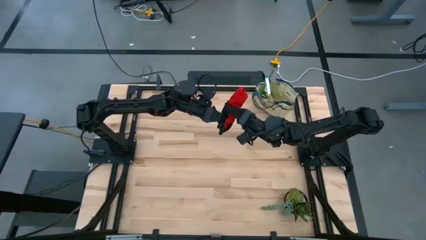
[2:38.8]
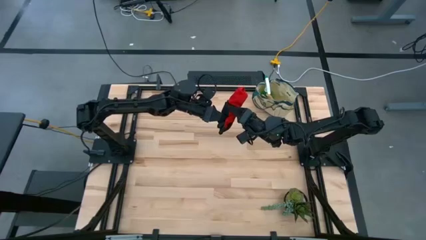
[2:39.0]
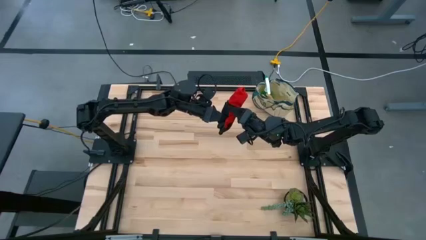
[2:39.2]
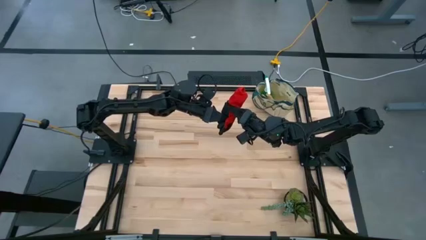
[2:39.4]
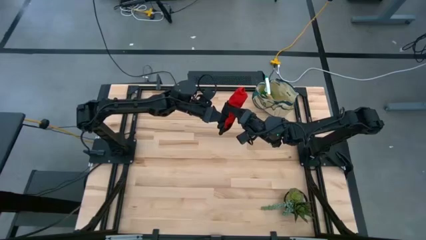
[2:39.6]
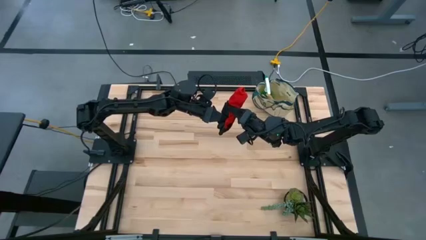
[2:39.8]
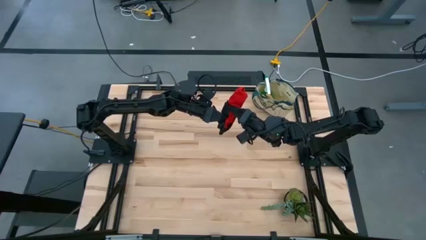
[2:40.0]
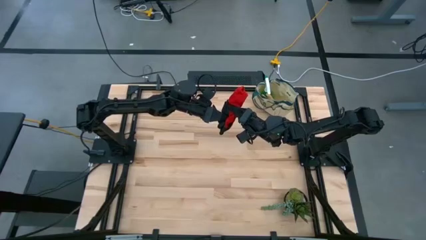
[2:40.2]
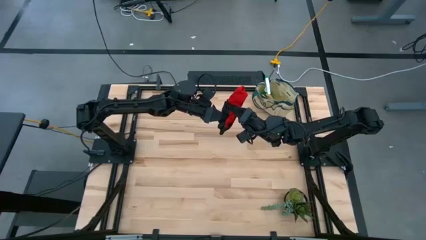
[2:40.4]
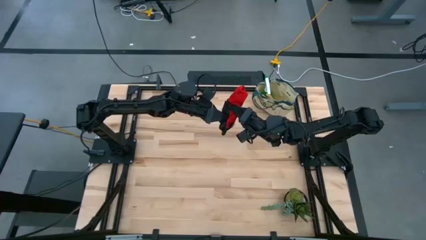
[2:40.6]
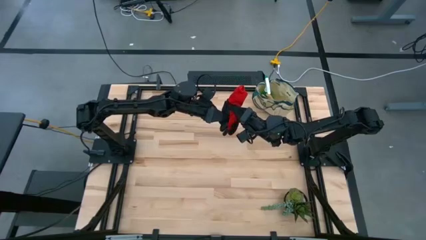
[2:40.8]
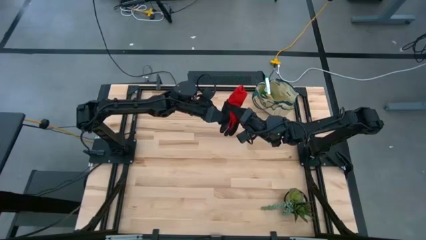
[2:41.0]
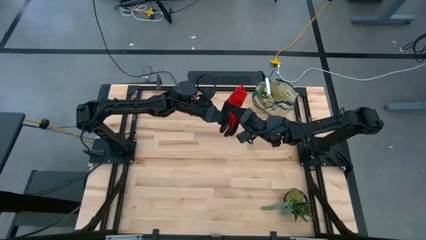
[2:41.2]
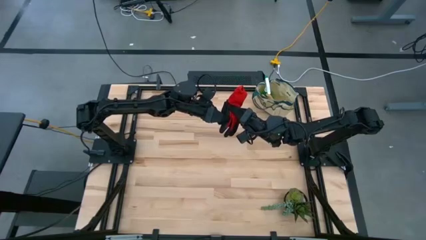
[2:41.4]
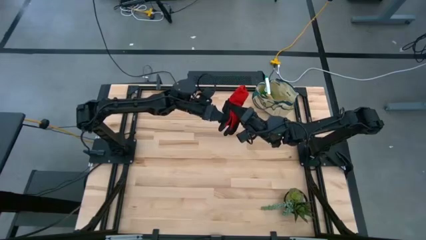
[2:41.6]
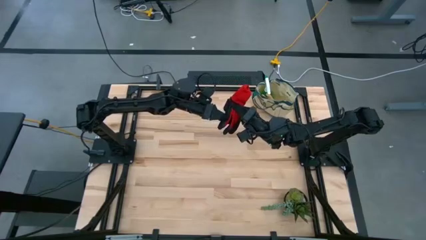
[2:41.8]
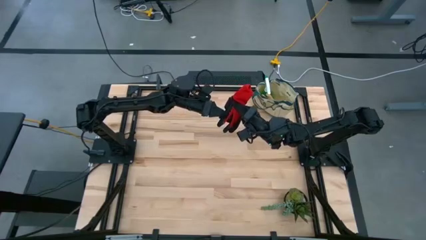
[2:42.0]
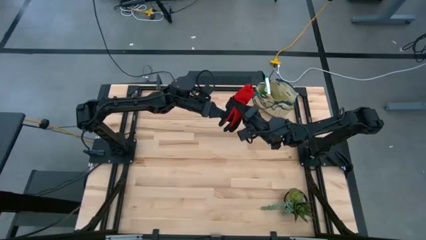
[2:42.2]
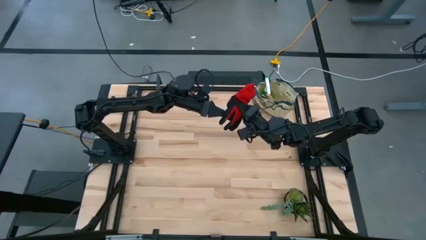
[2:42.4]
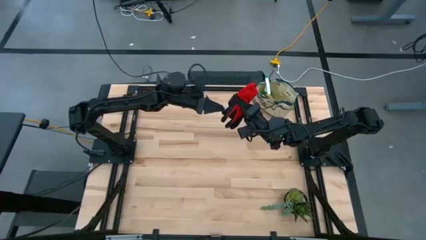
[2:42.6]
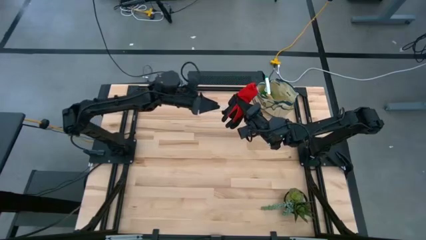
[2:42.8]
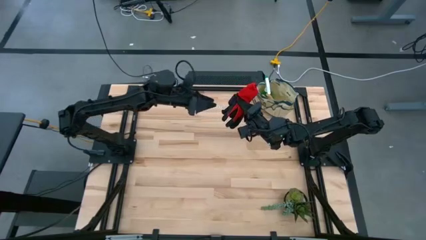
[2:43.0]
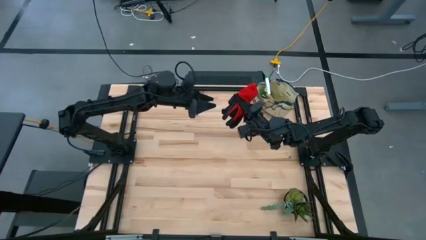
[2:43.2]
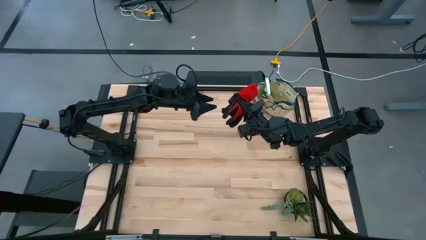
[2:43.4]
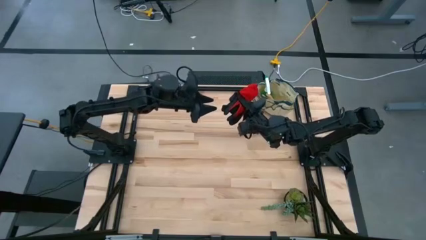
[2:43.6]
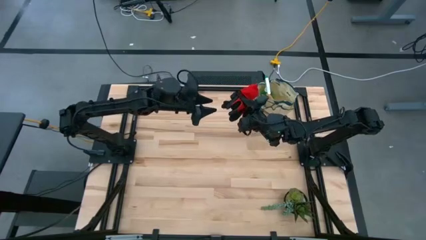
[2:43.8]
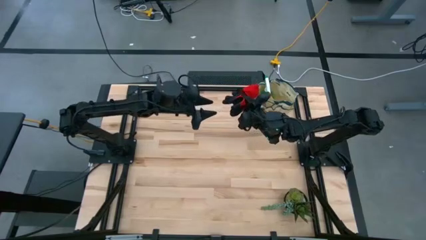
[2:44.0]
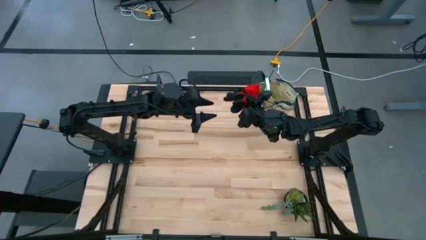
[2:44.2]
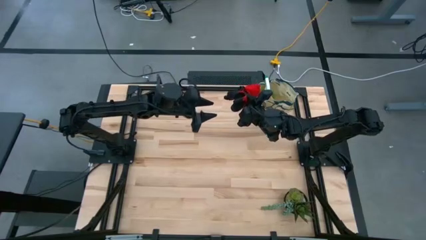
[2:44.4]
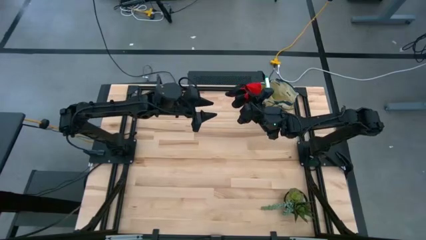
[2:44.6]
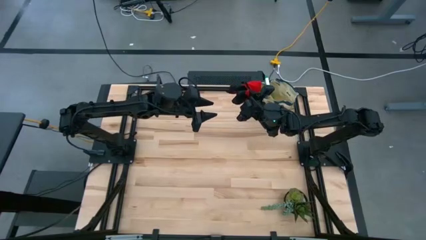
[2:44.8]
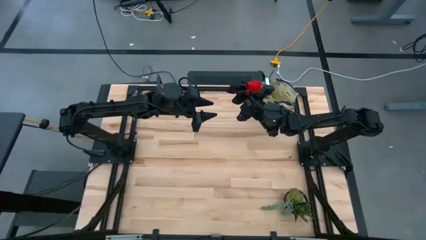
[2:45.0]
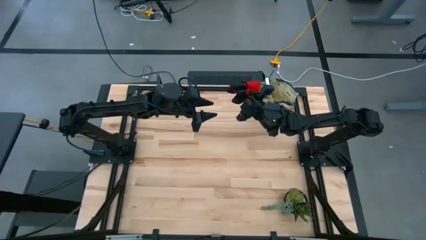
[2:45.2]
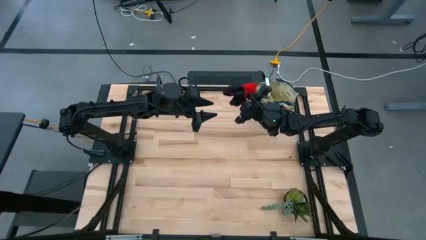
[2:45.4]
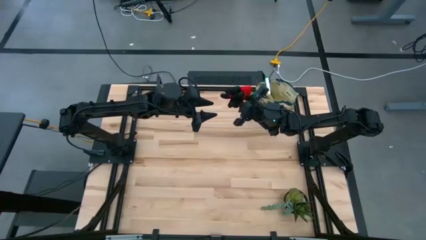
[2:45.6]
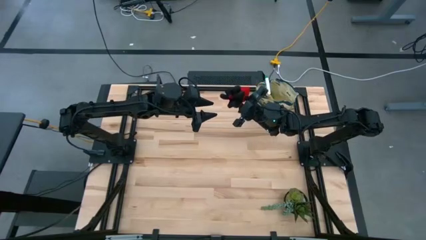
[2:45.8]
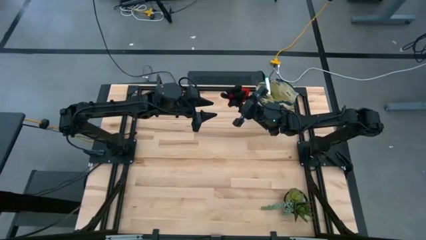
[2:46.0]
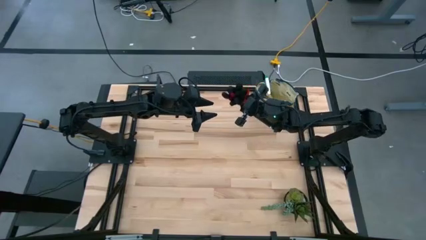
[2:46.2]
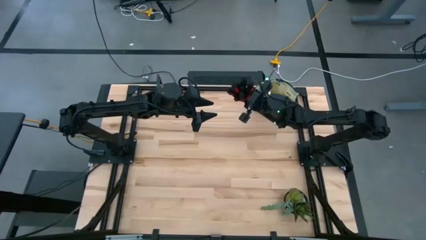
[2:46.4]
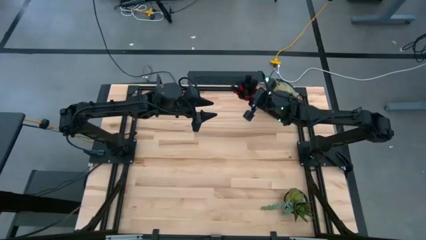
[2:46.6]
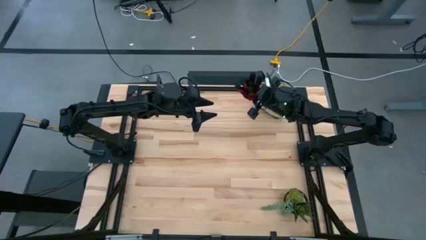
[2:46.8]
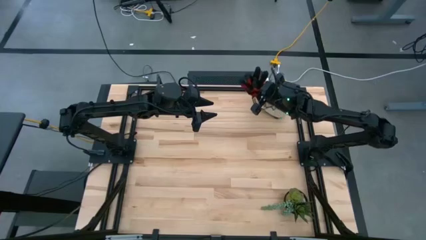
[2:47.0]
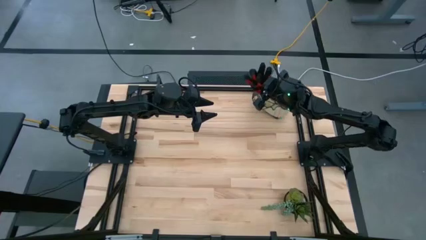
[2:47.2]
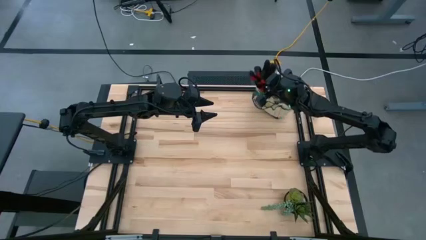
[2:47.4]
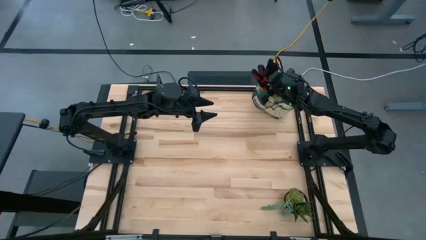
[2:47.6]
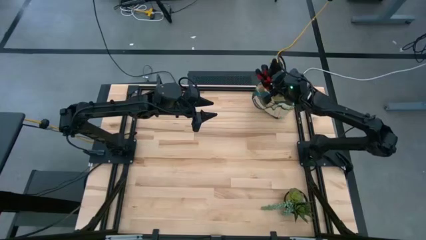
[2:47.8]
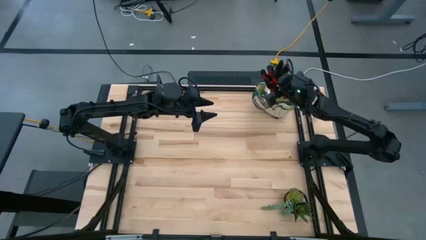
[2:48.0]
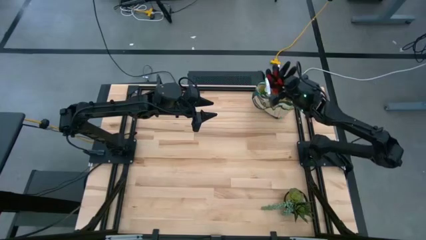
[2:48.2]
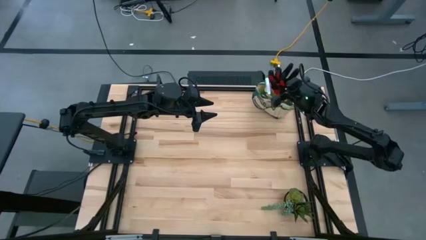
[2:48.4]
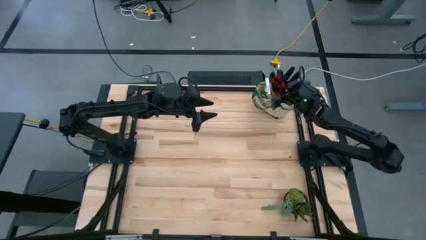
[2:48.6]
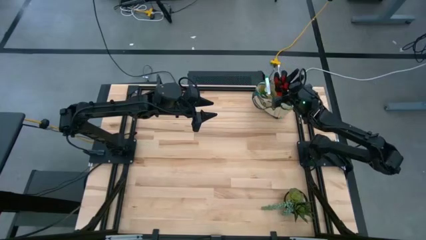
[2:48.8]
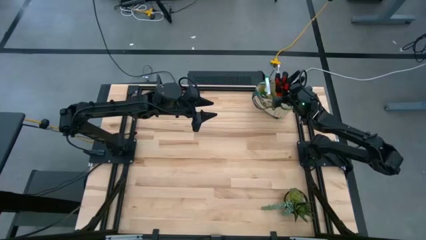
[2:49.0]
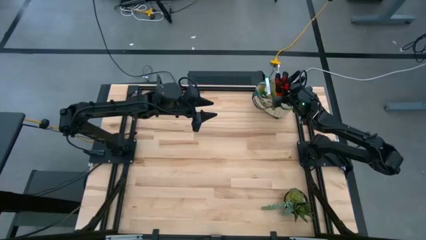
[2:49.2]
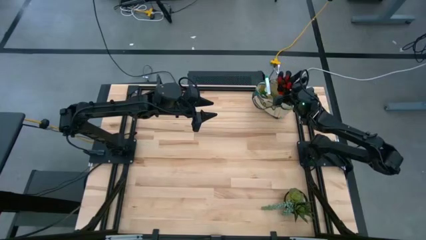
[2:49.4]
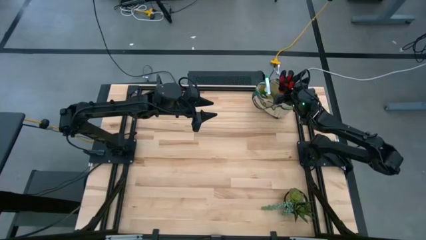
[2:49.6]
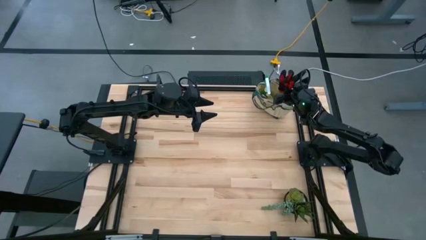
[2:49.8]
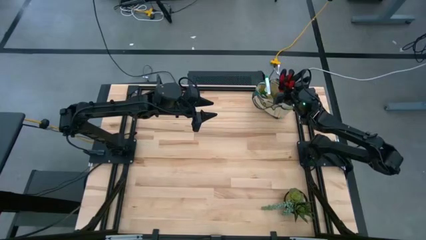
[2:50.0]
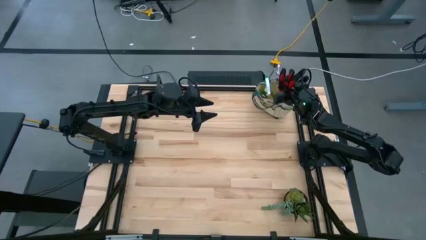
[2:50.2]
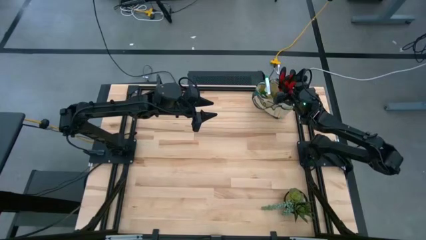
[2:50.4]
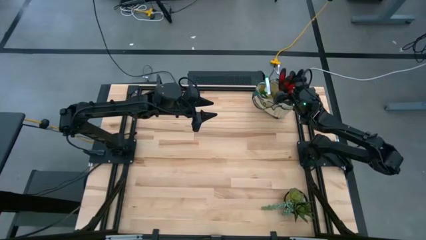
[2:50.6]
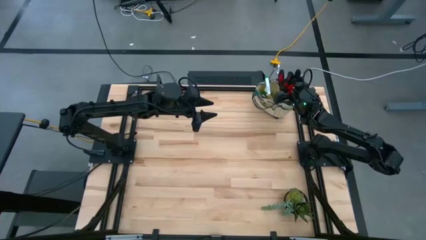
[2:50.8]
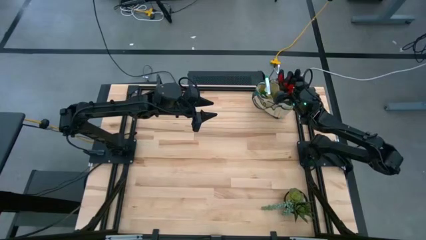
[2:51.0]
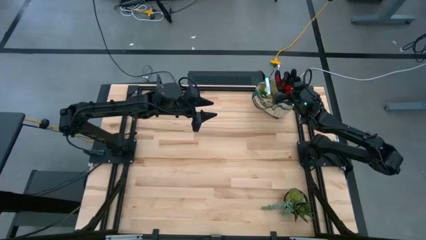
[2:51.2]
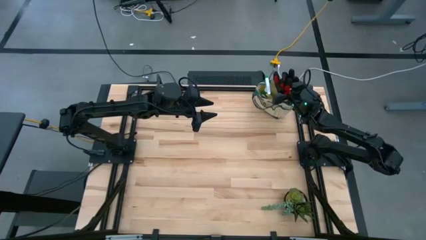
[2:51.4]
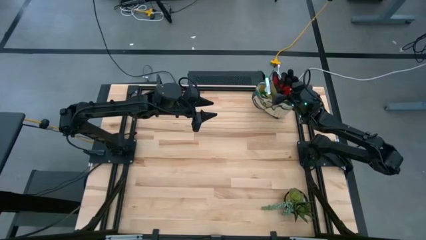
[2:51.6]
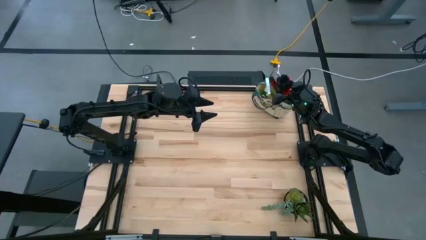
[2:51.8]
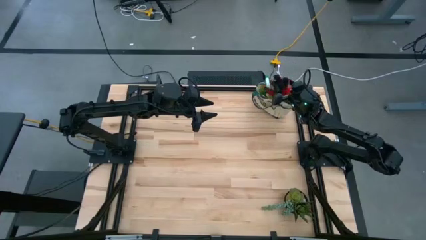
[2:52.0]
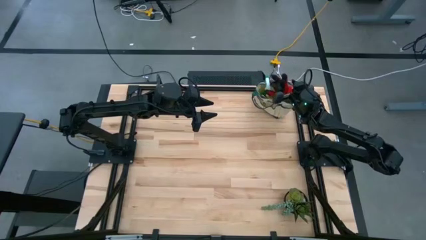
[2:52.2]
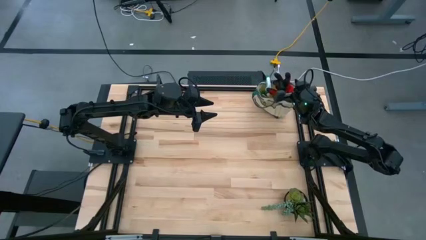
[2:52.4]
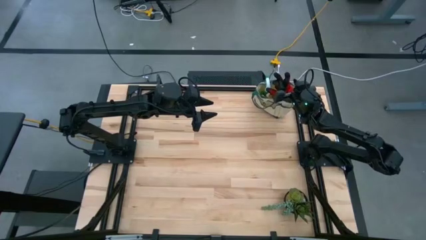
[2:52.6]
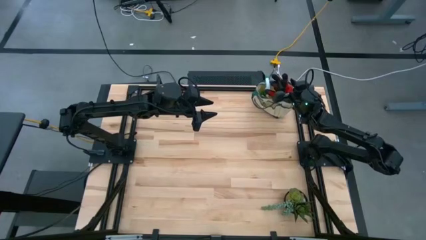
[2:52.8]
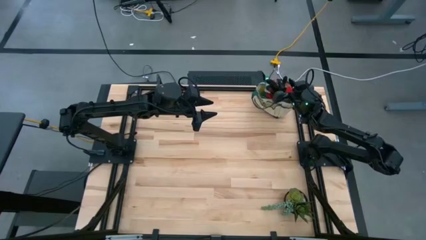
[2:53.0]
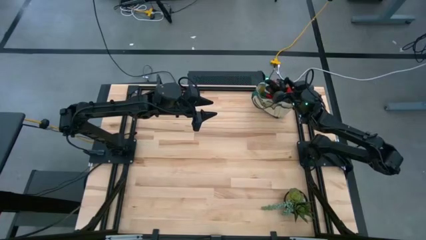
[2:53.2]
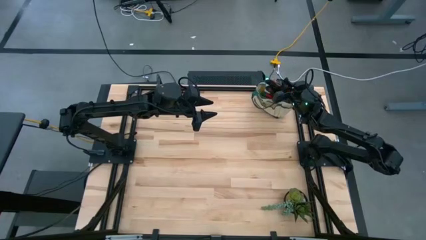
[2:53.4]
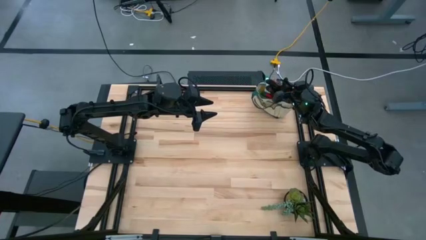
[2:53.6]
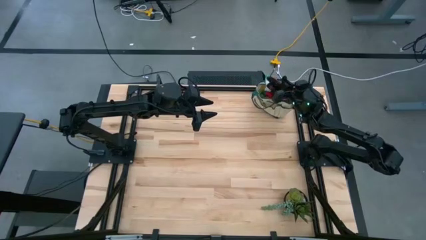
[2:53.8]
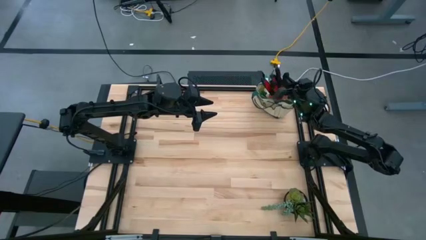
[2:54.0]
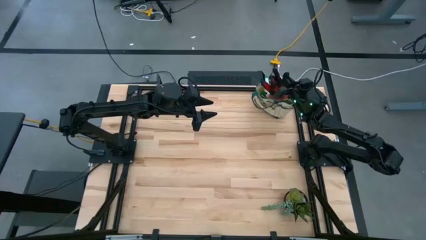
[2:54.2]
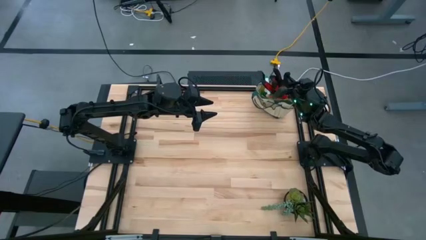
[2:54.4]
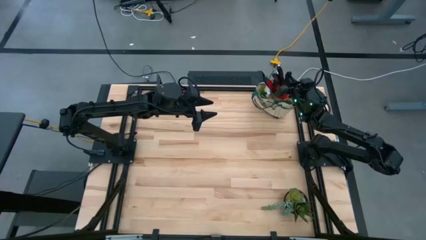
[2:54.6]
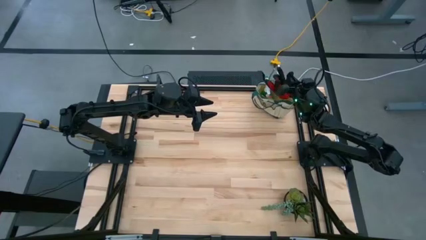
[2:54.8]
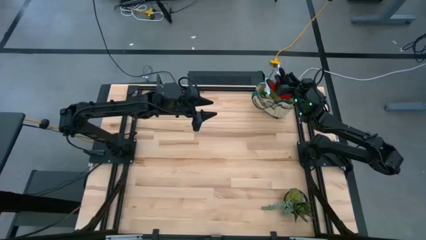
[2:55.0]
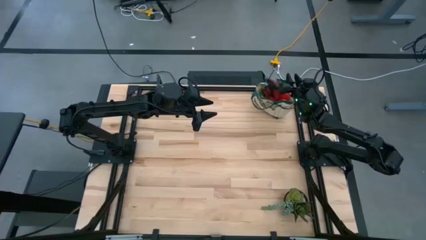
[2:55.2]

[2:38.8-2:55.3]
Task: Pick & Place Garden tools in Gardening bag
Put the red gloves into the gardening bag
